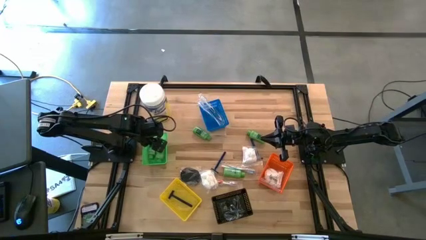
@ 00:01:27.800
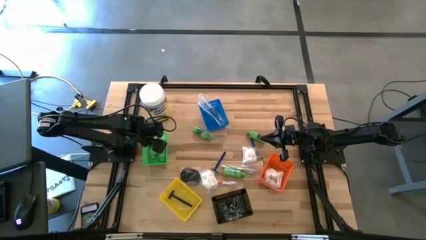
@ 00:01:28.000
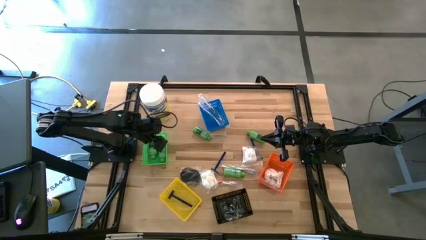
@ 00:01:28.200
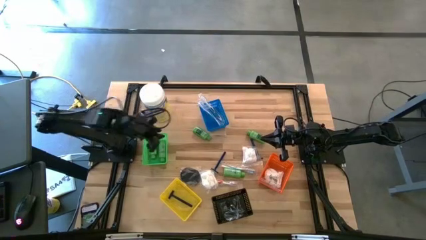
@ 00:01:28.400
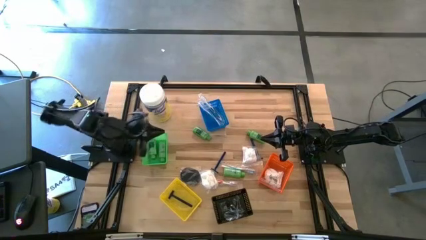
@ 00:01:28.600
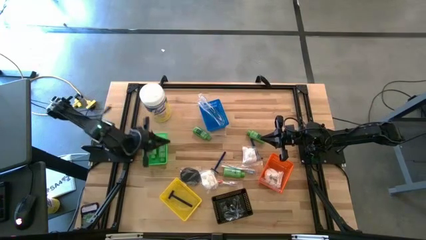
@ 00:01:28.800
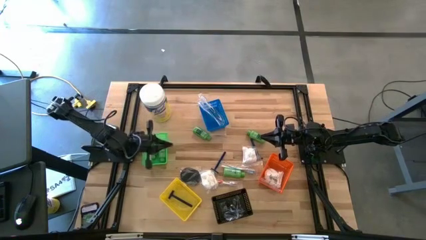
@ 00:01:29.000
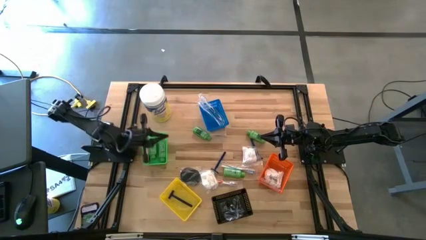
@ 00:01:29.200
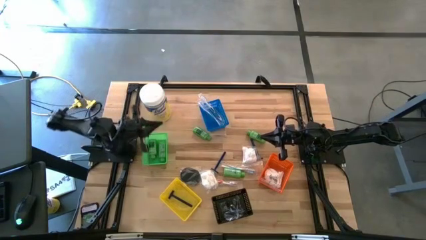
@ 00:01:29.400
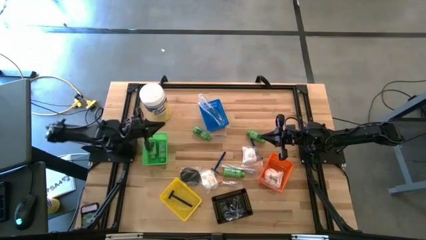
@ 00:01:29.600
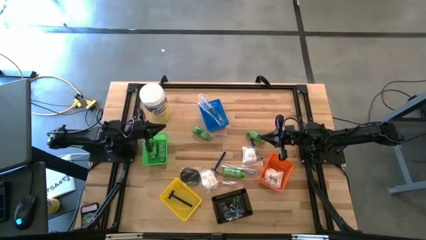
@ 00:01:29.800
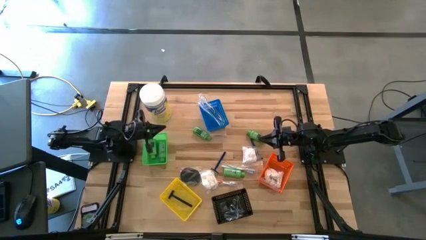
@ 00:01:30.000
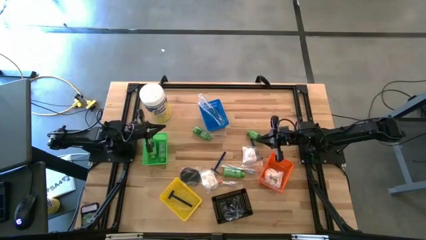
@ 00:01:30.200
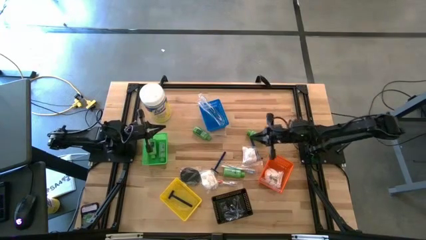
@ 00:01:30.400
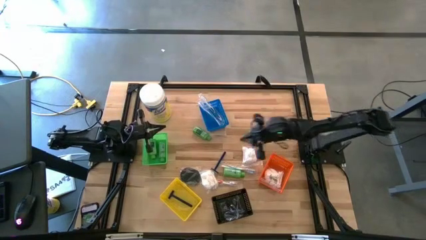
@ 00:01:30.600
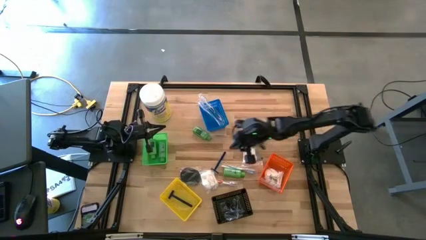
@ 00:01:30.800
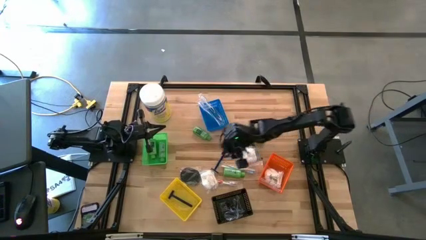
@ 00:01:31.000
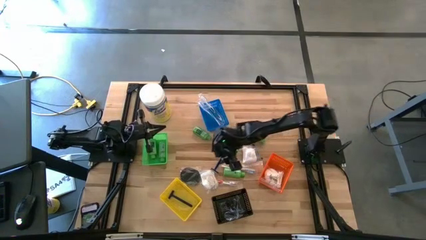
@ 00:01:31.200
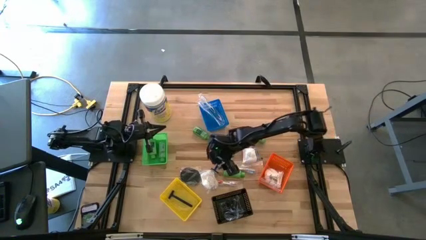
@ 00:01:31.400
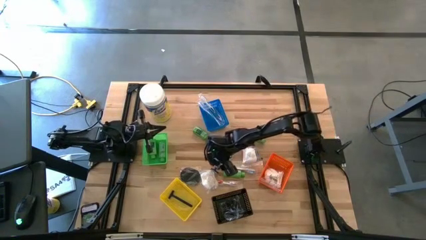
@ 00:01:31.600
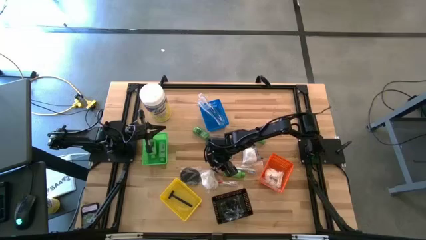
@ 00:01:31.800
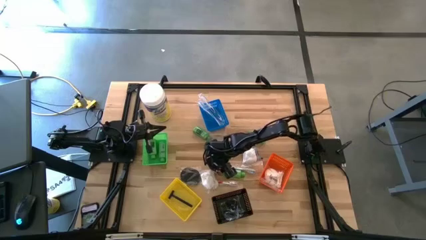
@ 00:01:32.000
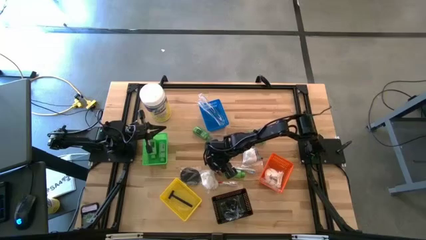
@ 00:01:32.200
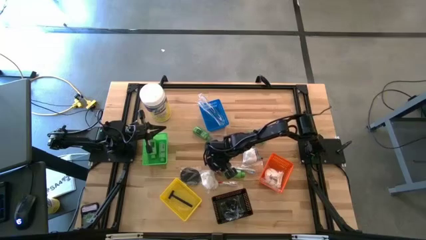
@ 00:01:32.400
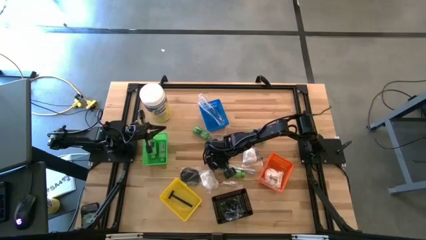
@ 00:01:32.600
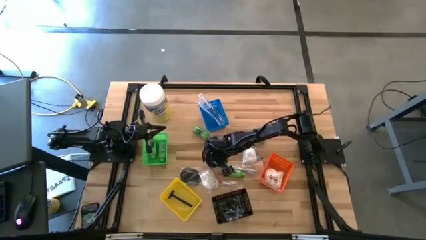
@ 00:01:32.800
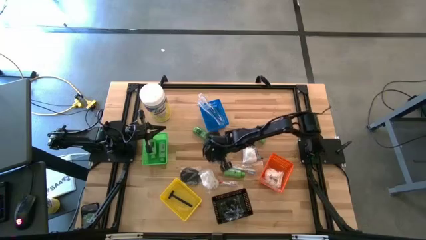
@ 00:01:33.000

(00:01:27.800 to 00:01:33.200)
Task: Pick & Place Travel size toiletries
Put the blue razor into the yellow bin

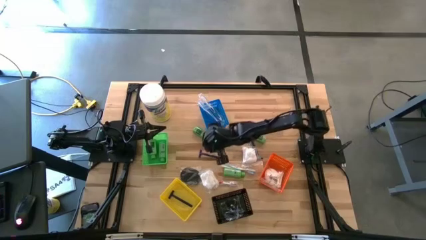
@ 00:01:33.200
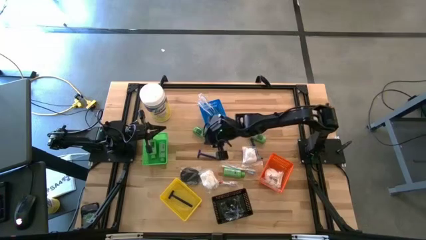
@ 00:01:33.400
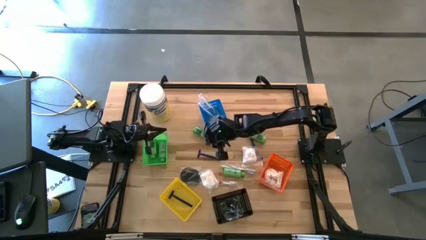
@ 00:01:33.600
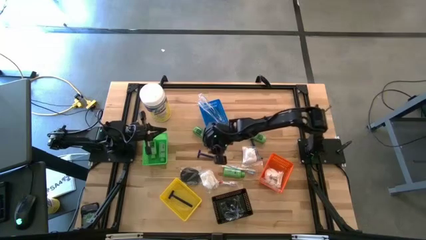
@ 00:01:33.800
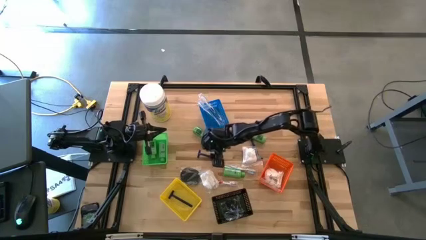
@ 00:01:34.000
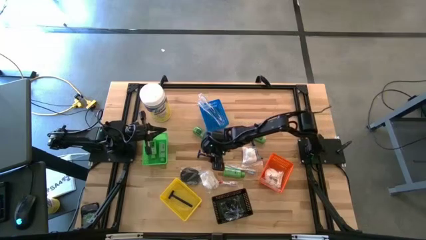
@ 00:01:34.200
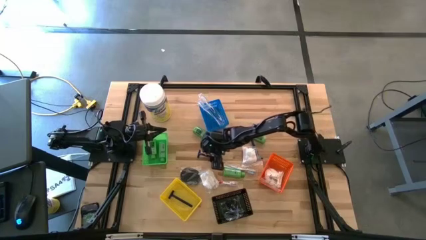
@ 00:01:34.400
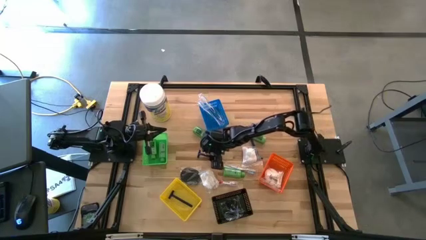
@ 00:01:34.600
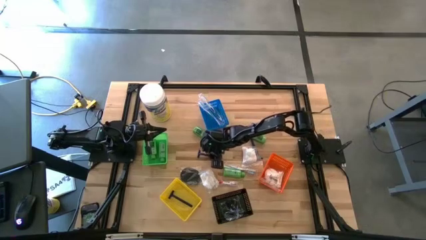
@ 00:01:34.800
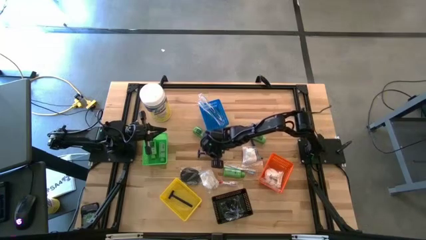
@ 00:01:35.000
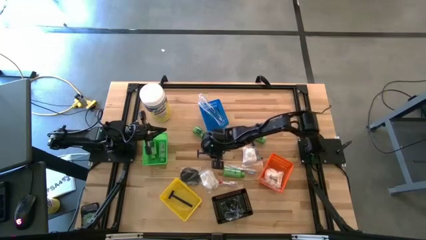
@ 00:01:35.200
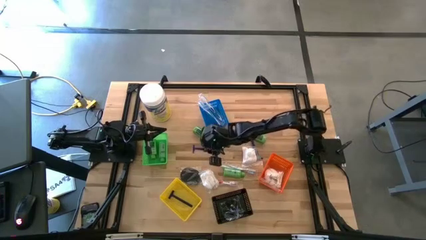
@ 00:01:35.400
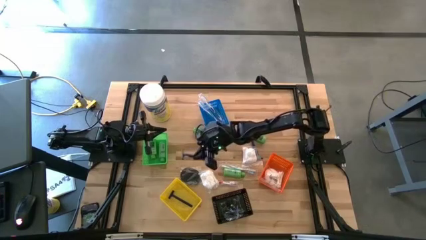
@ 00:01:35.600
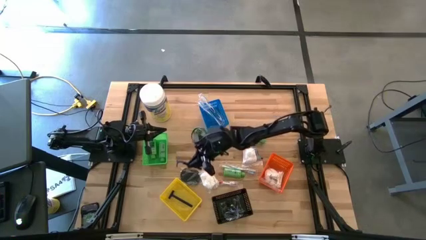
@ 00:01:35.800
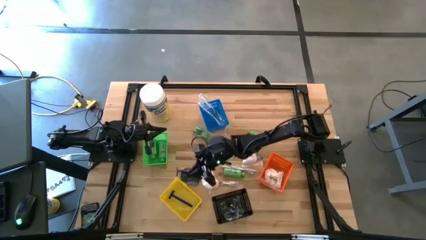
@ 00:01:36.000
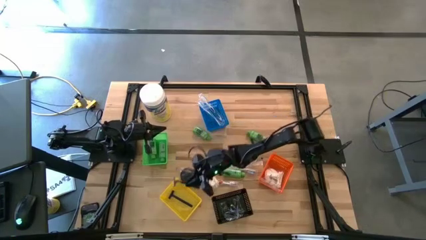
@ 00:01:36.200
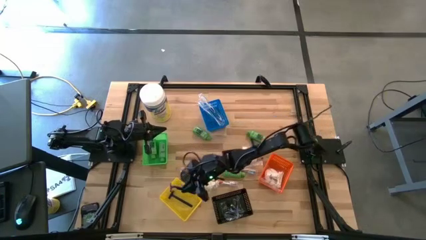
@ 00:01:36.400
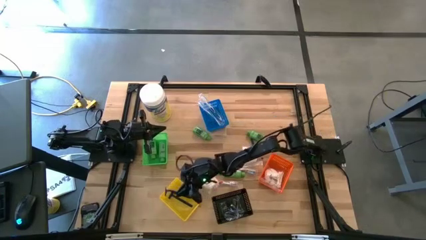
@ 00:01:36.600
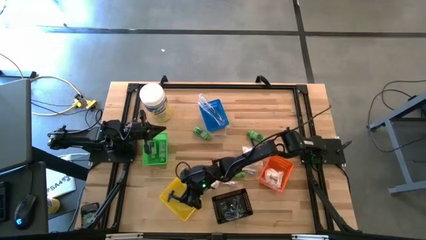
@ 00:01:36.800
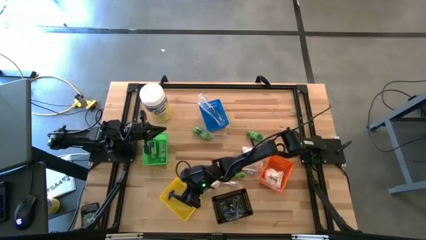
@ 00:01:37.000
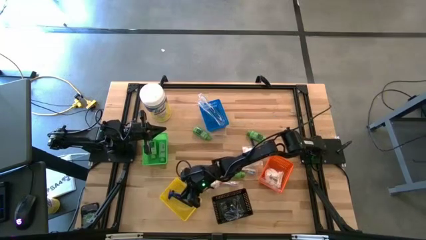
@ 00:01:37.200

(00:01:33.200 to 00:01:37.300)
Put the blue razor into the yellow bin

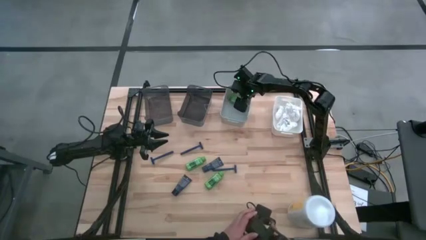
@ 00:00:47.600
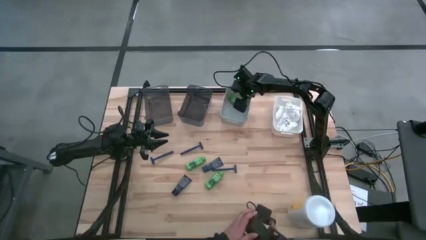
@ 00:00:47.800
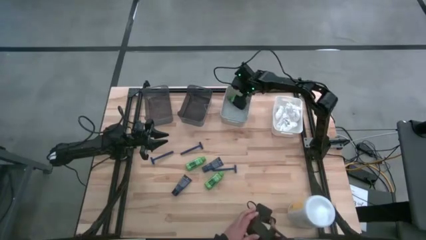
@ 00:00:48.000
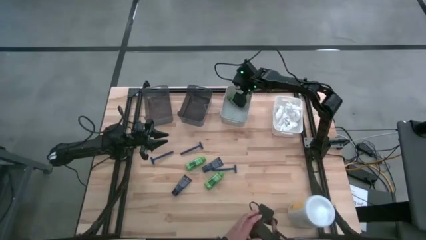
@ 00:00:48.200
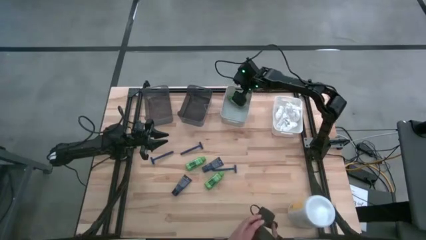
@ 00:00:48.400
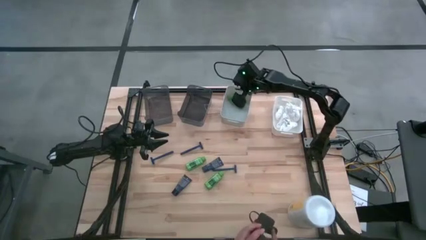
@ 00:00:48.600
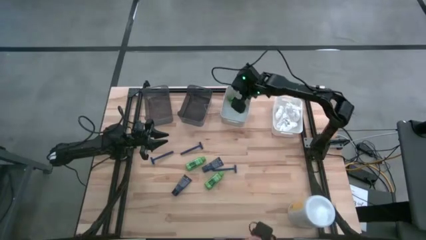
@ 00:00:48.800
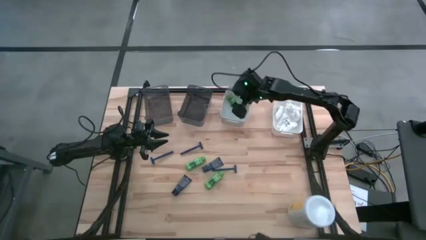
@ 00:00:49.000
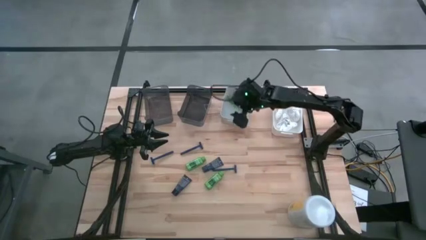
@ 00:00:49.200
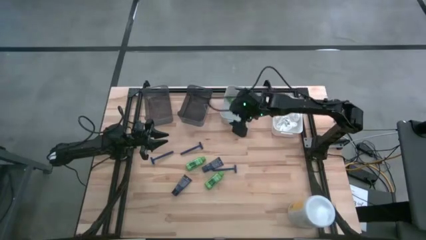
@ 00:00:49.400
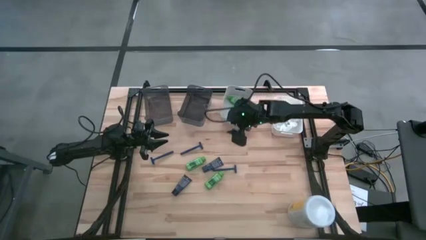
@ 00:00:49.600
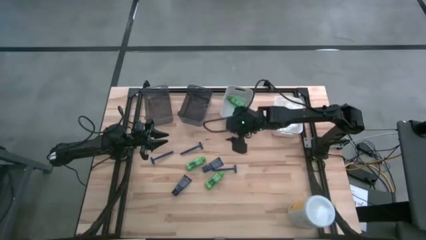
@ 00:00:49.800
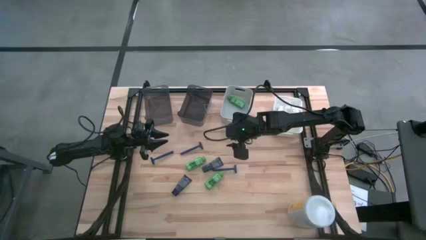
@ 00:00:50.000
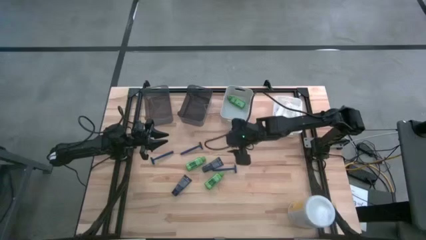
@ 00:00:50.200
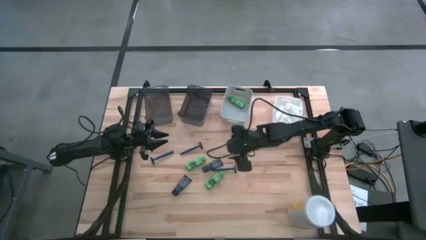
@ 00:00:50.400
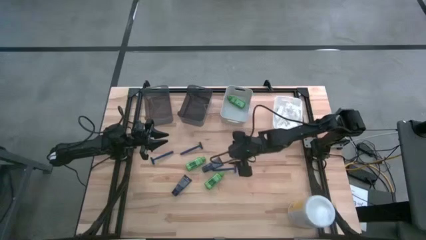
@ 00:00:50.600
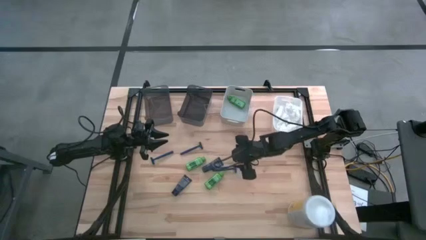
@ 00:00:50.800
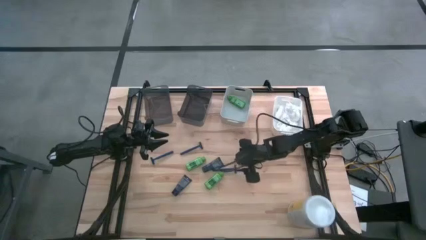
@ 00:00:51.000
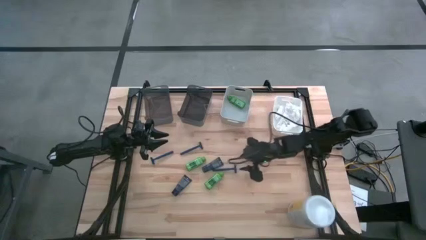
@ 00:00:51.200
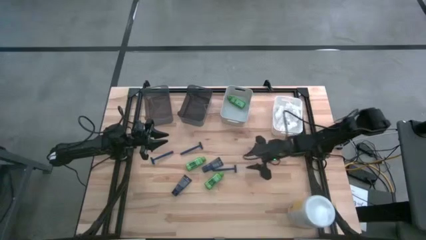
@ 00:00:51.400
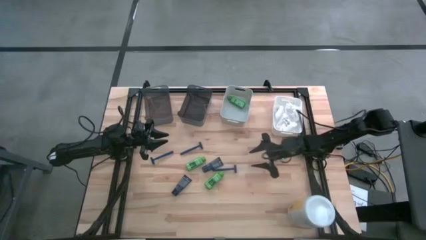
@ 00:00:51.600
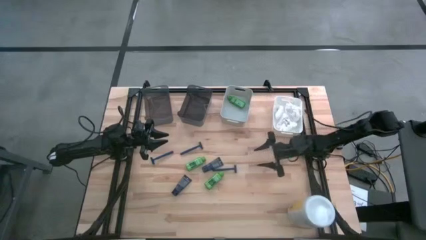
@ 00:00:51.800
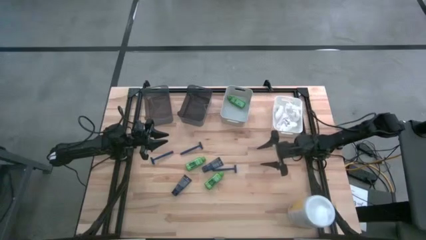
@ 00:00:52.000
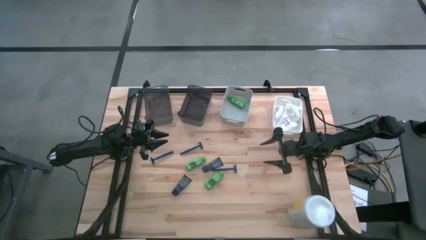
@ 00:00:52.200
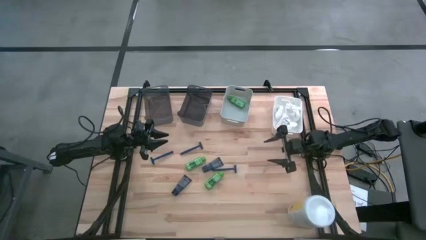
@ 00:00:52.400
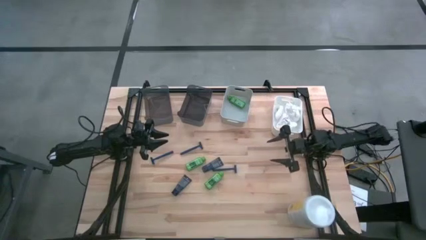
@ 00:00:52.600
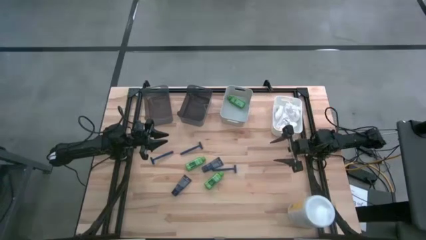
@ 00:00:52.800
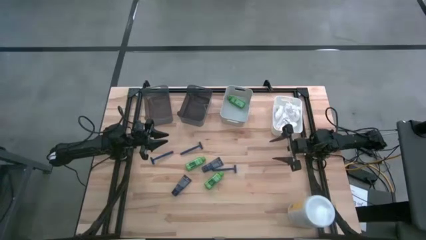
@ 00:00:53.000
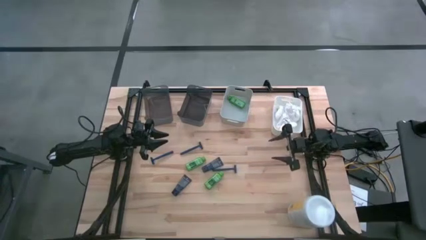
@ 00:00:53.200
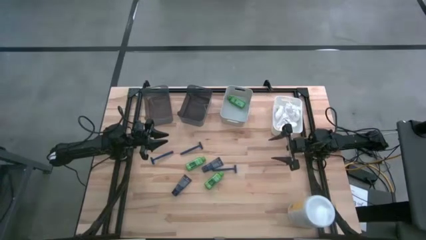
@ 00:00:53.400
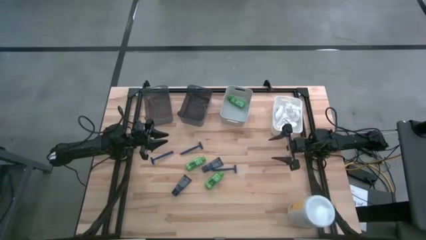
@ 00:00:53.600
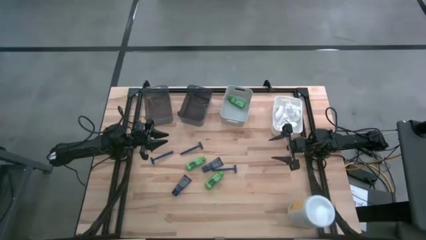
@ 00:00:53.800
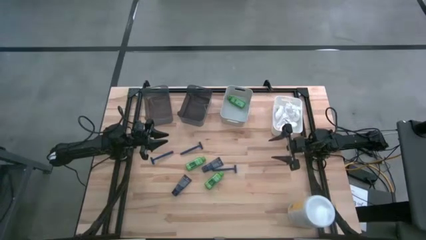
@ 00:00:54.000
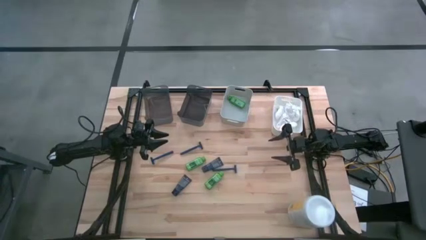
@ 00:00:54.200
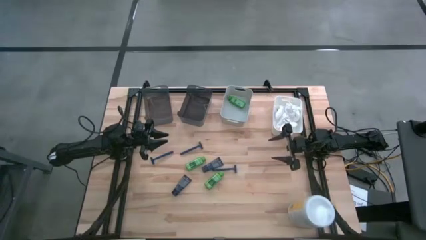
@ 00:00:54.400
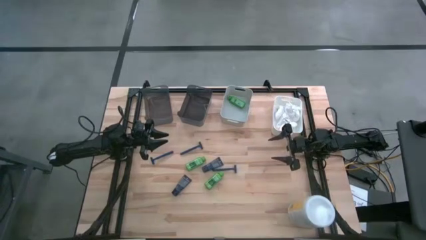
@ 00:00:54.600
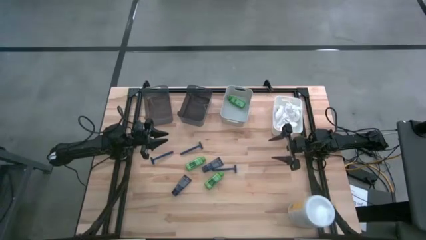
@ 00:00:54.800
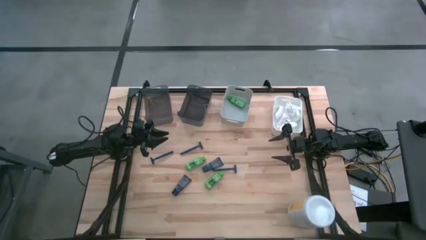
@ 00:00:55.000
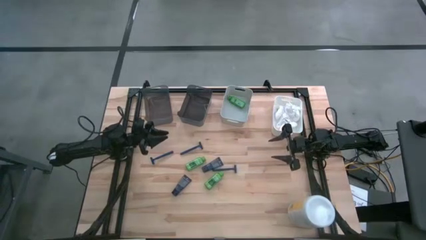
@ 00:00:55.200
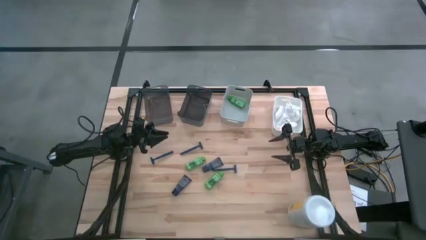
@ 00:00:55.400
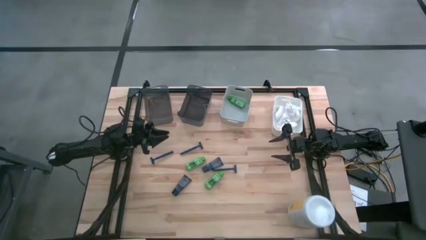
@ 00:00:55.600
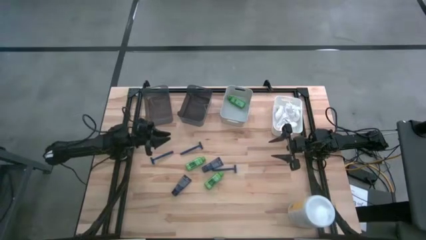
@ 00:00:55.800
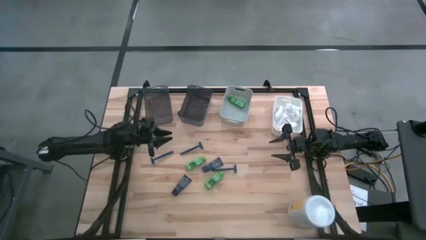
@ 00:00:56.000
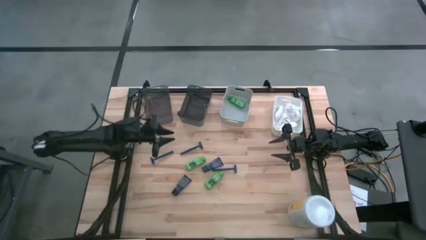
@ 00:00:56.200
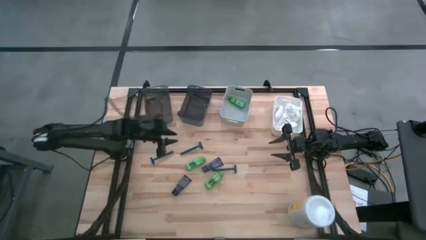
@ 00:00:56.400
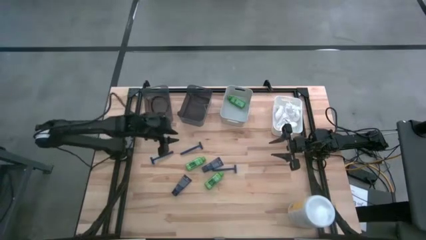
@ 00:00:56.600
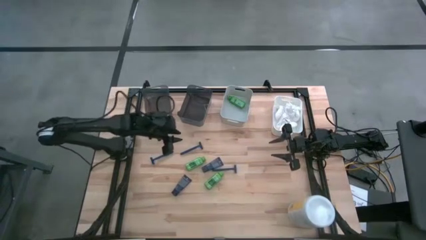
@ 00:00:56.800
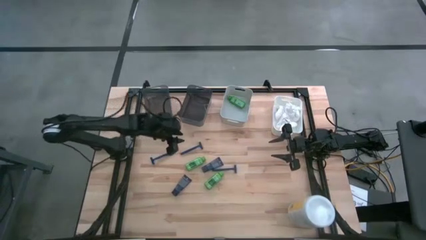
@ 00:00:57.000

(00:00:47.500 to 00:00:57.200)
Task: Pick & Place Travel size toiletries
Put the blue razor into the right black bin
